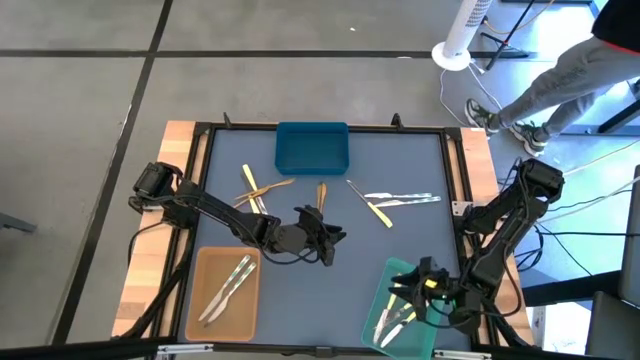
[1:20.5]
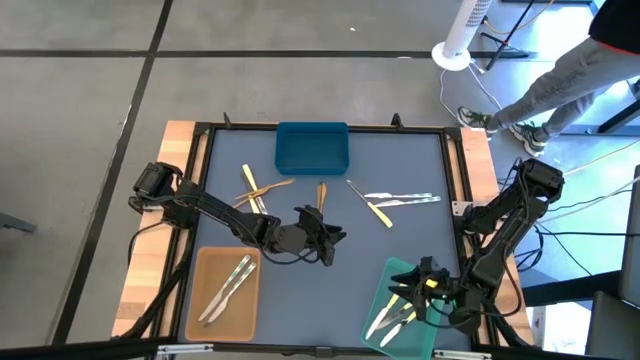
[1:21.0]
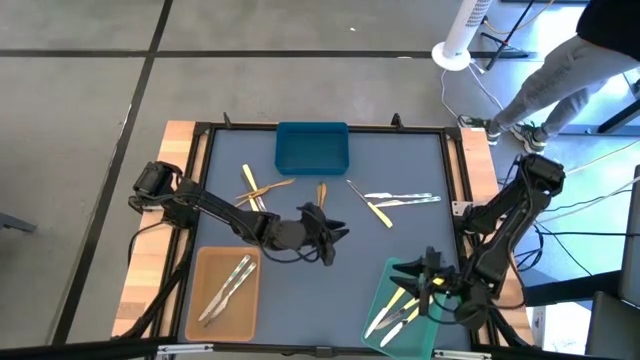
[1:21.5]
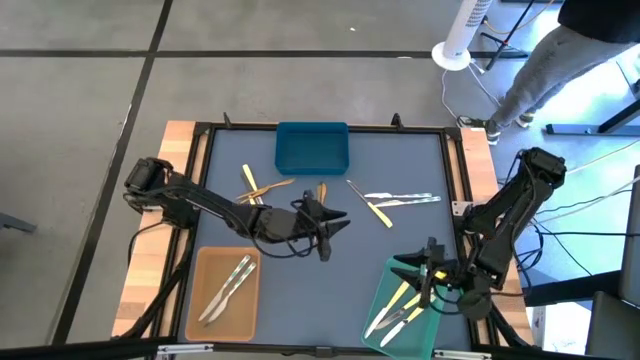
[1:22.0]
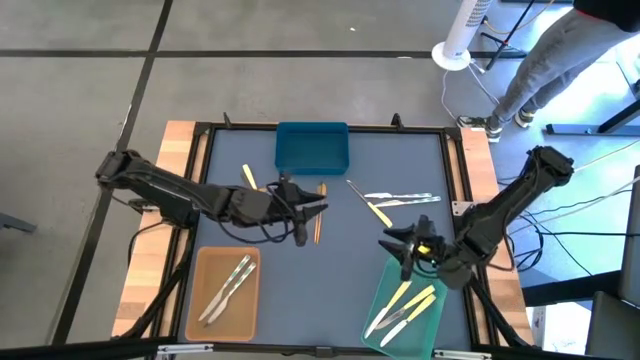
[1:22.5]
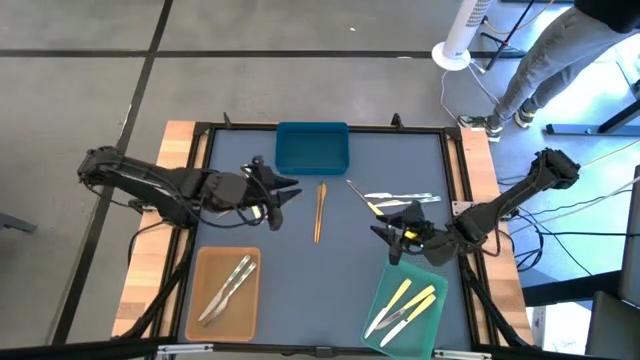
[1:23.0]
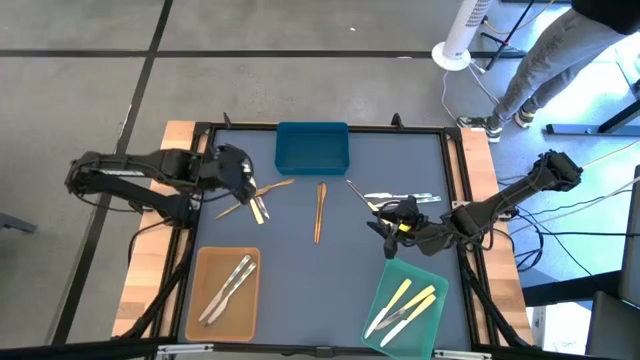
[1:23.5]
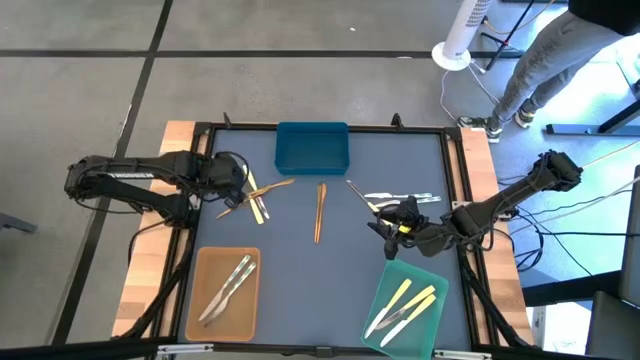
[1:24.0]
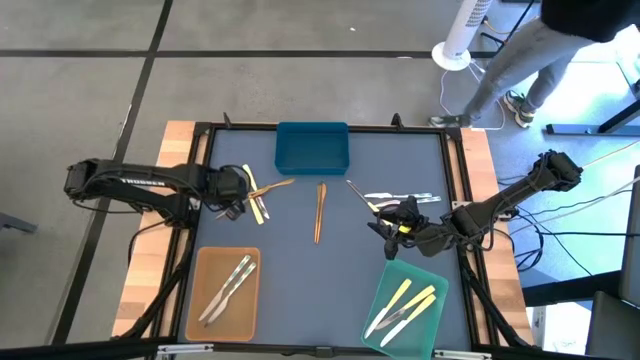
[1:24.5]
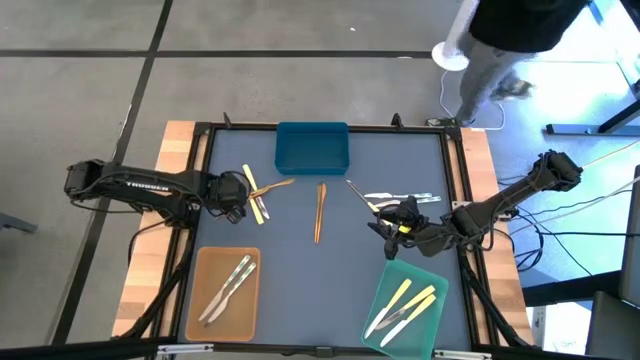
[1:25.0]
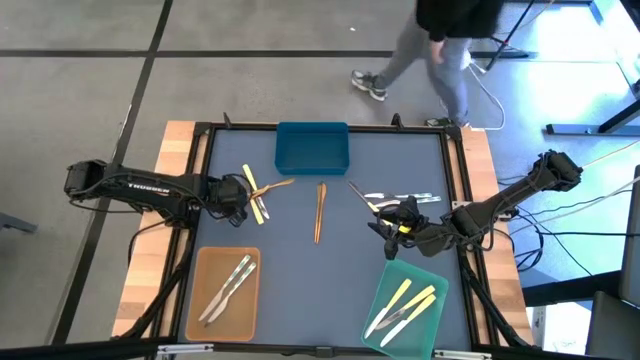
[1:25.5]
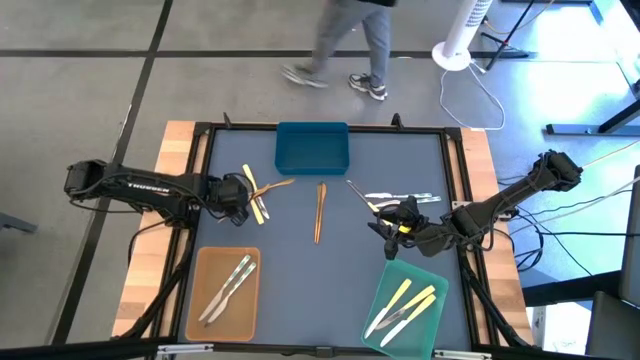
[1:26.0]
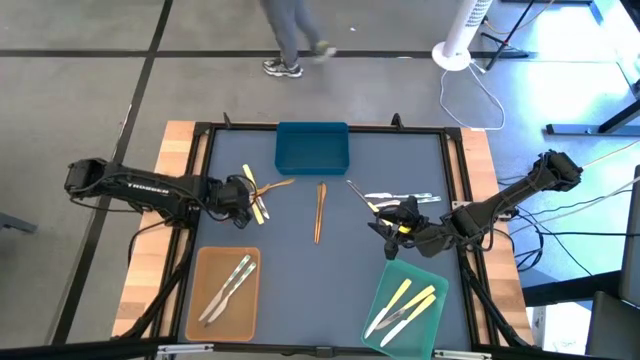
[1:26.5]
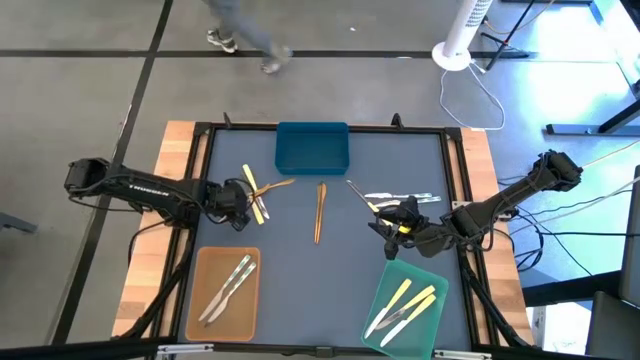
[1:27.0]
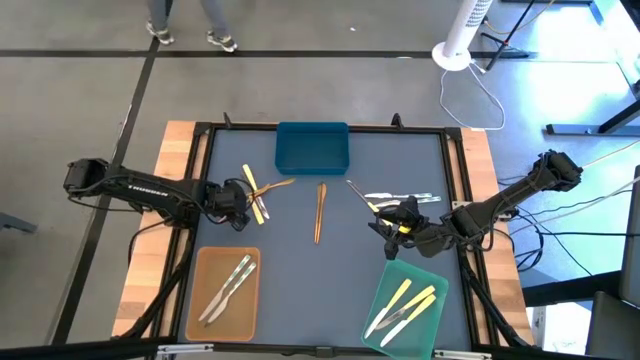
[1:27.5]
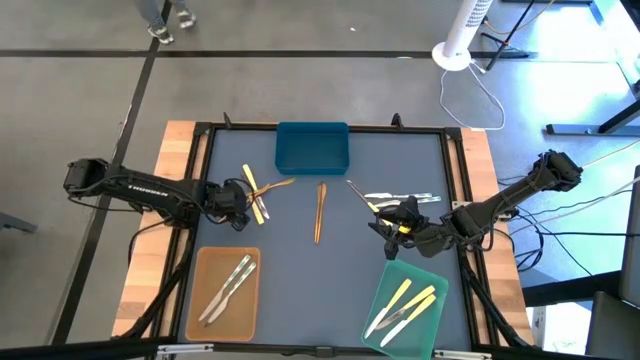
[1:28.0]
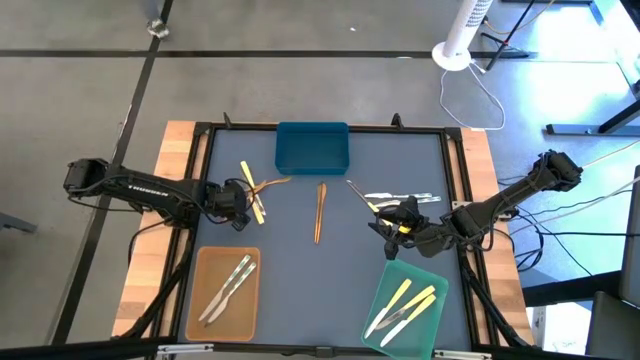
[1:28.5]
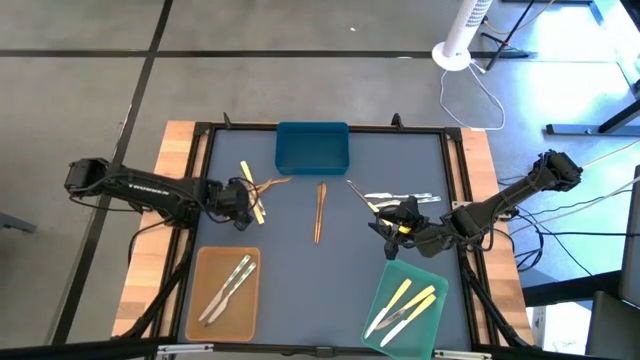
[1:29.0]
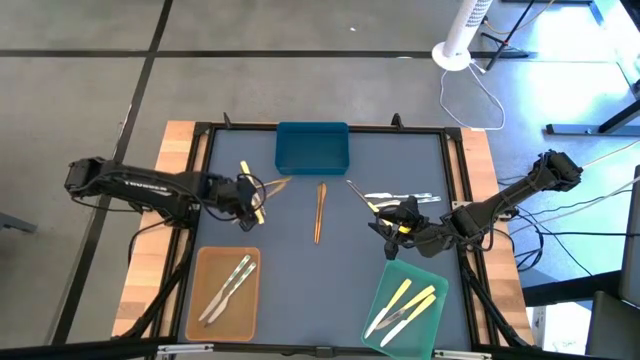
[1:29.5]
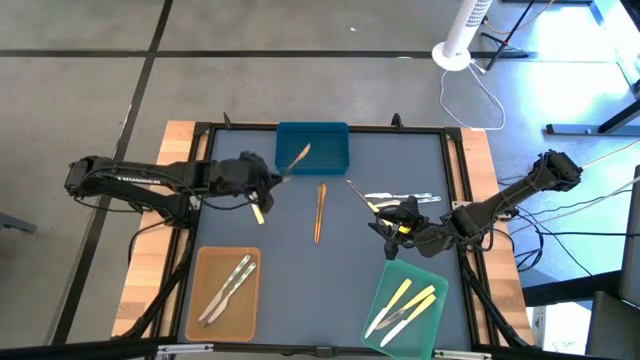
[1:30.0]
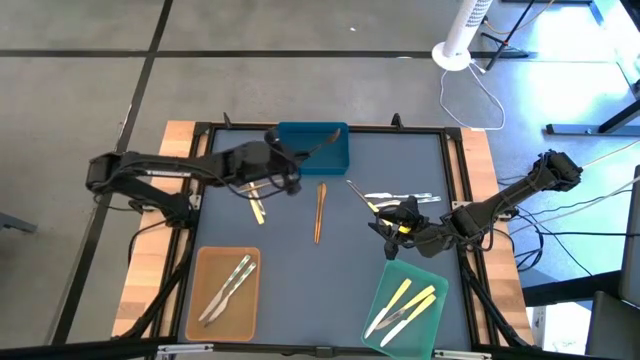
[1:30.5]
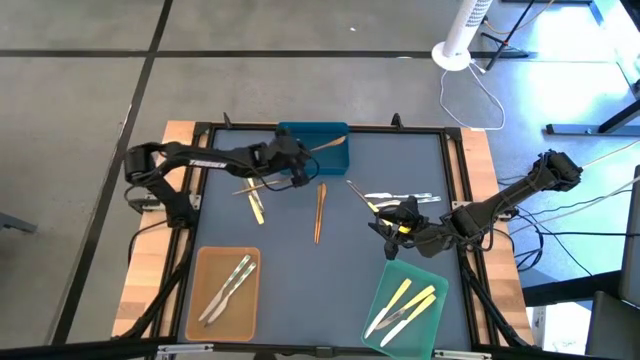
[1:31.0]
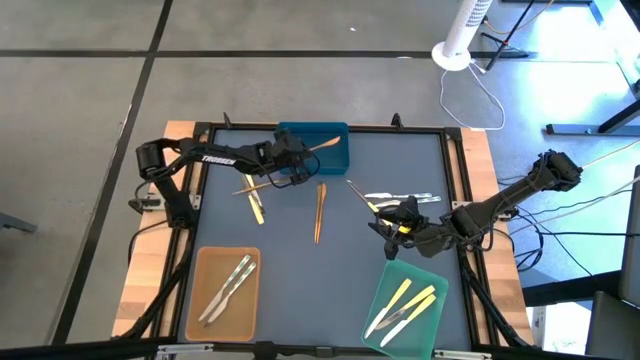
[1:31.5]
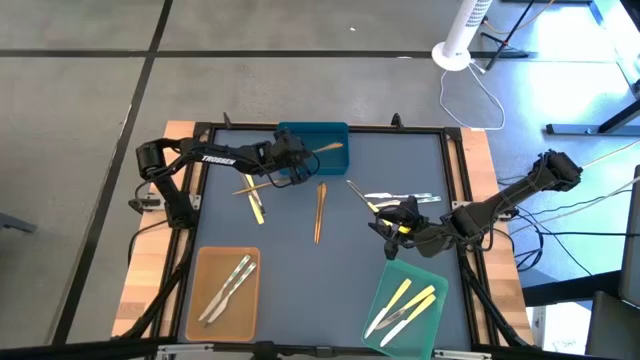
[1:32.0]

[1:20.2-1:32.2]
Task: Sort silverware by color (type)
Put the gold knife into the blue bin

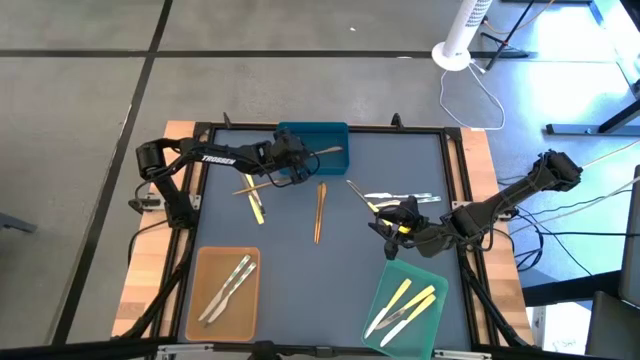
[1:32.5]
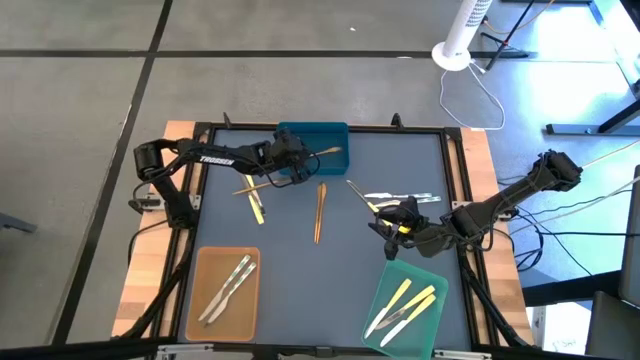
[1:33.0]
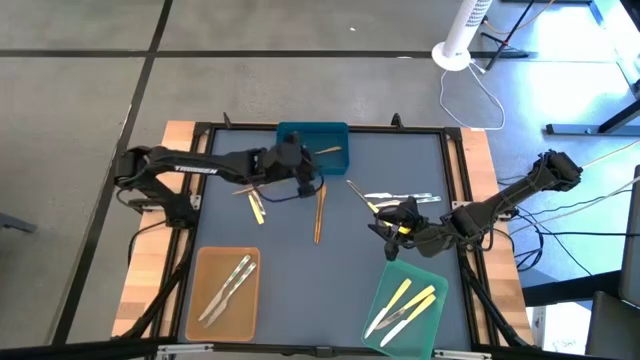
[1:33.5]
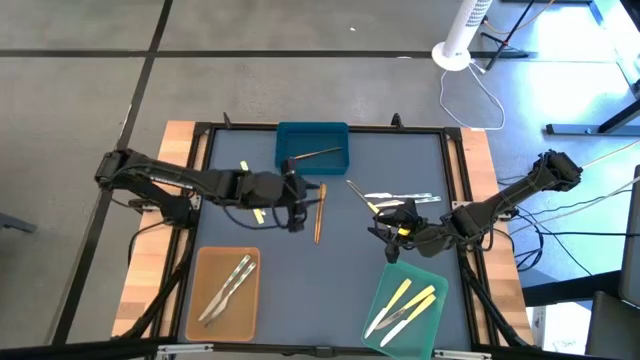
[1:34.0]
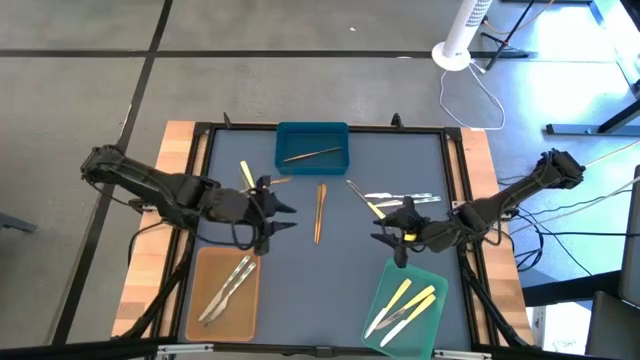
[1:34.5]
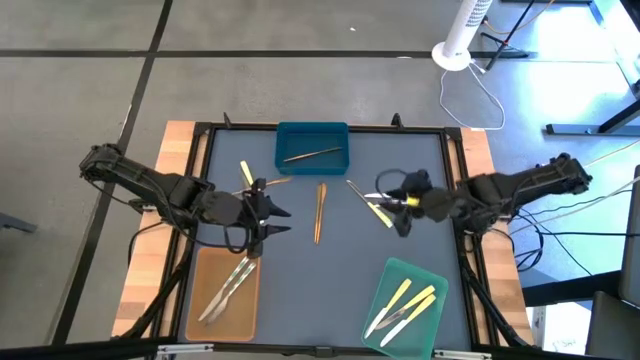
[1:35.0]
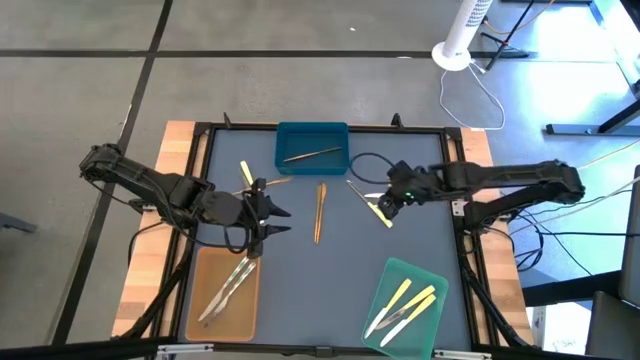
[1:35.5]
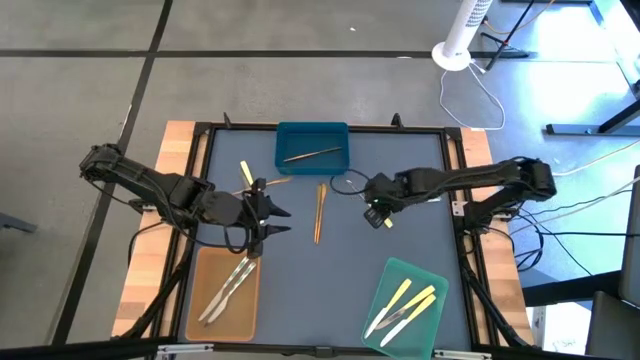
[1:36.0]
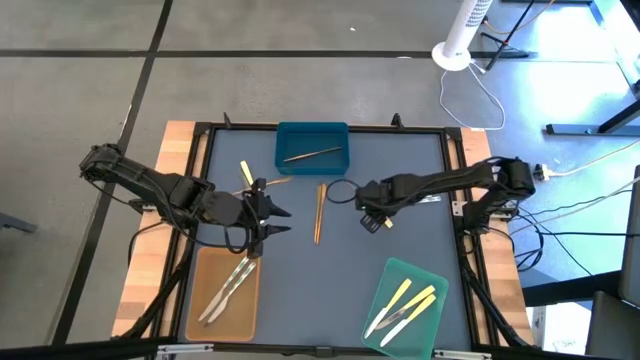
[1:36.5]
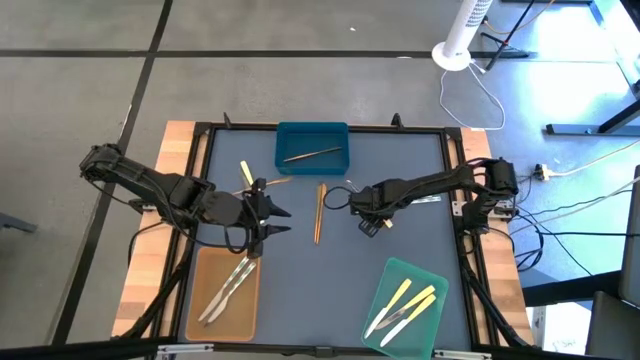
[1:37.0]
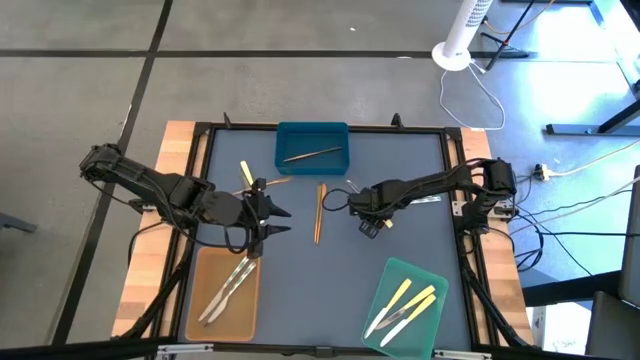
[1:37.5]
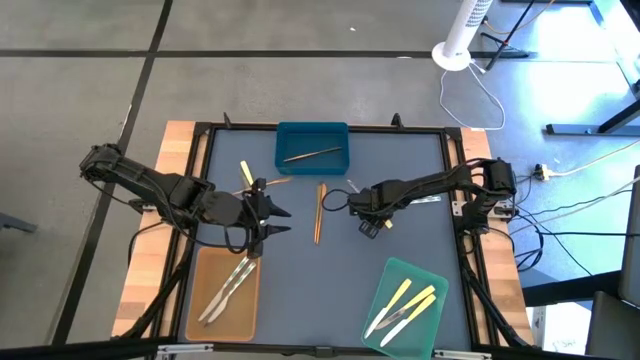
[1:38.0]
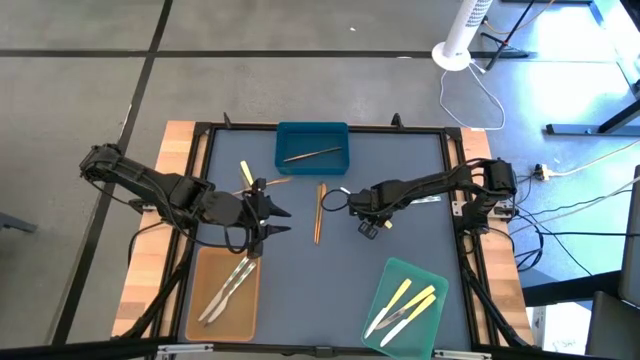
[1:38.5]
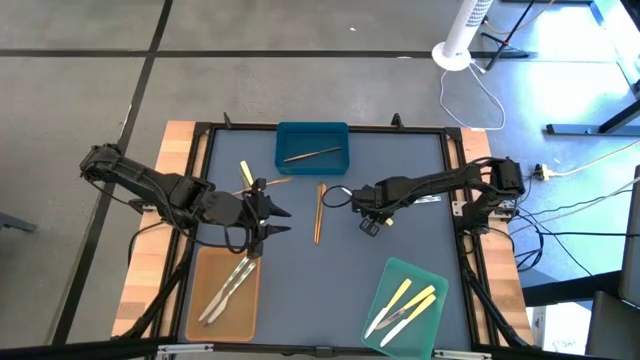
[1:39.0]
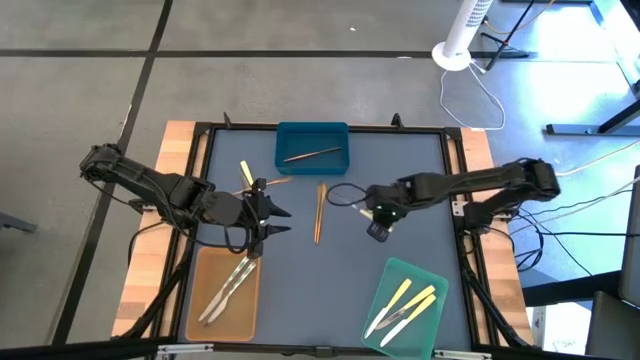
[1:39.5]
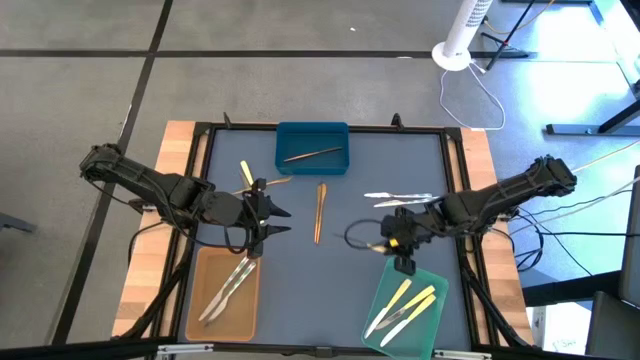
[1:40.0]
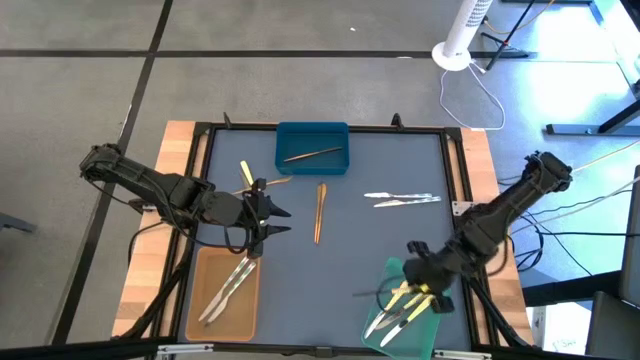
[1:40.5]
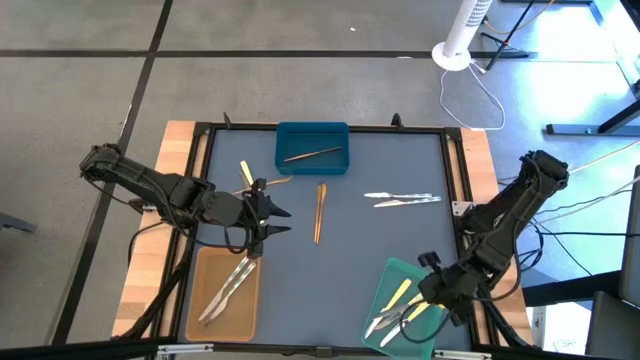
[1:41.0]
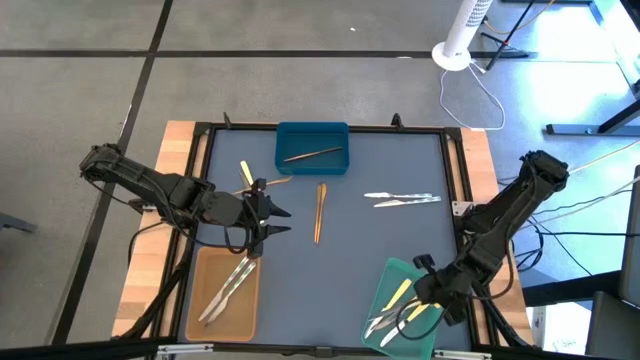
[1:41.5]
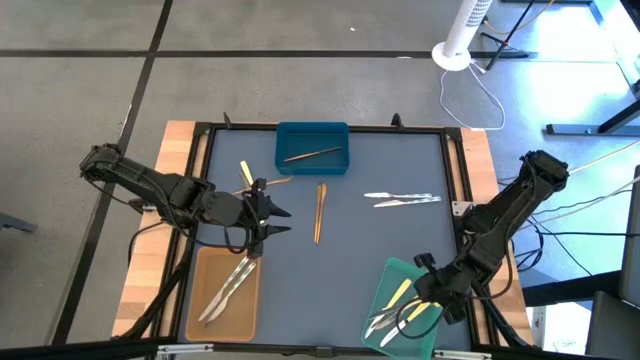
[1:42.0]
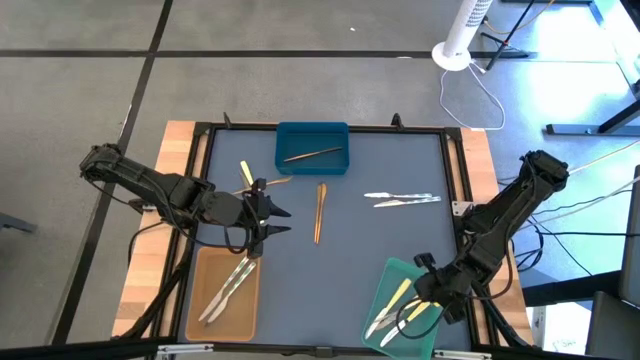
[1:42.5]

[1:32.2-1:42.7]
Put the yellow knife into the green bin
